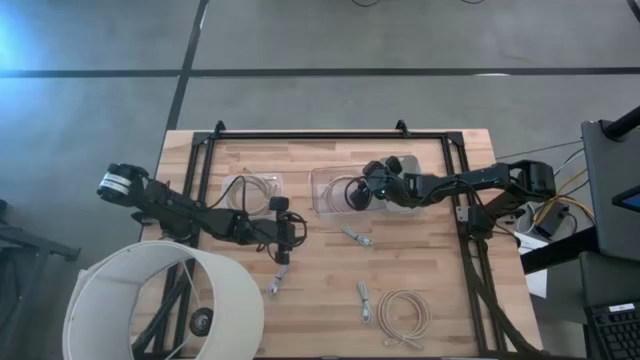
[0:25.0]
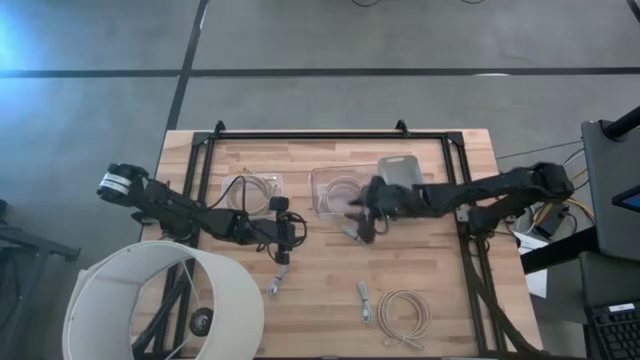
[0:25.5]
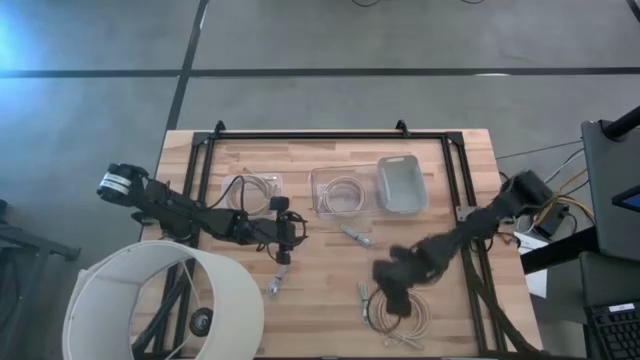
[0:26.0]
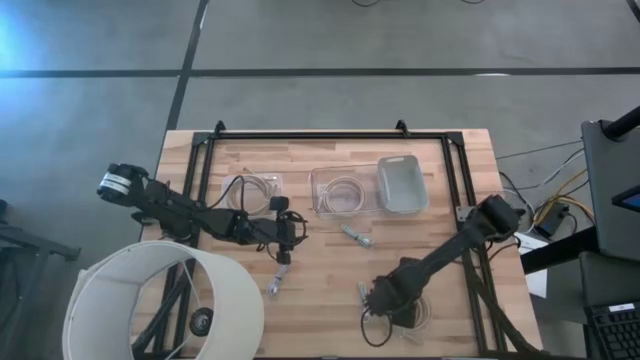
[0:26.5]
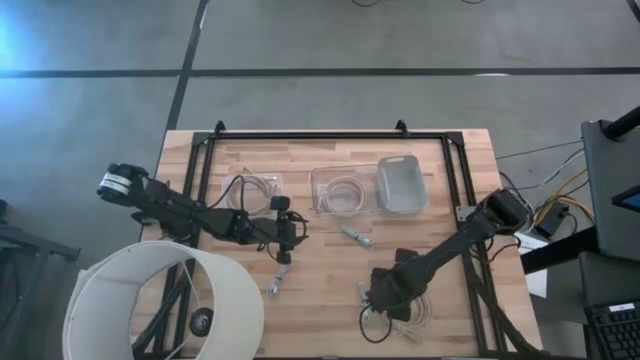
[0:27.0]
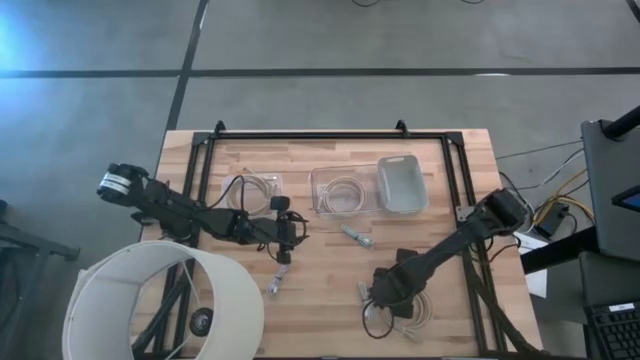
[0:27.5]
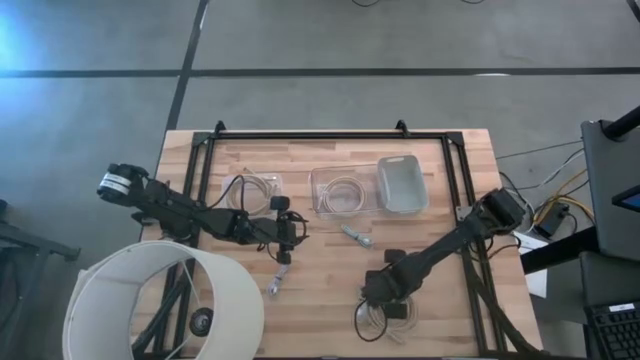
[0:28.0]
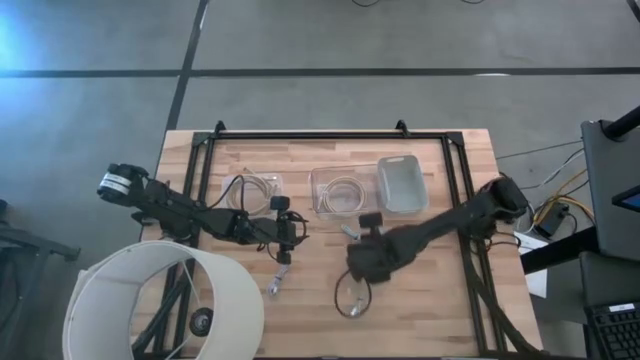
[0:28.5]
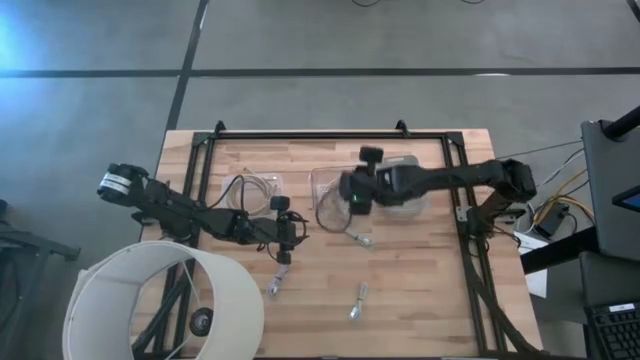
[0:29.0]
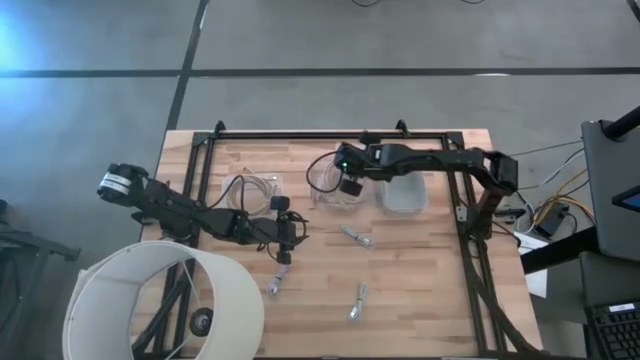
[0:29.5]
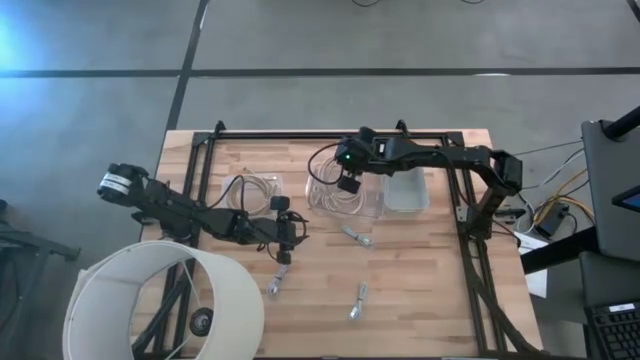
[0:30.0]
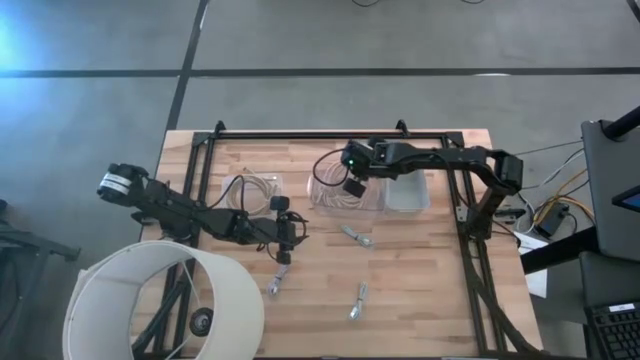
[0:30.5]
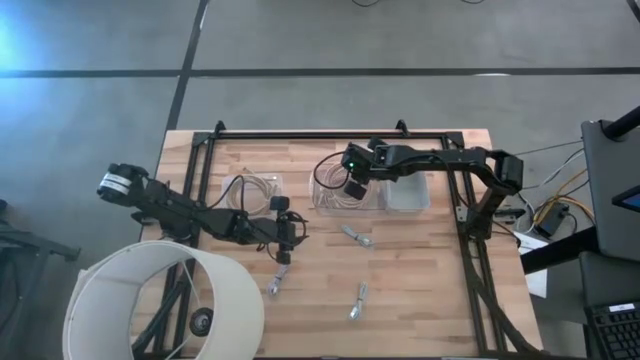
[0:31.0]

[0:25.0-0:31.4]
Task: Pick & Place USB Port
Put the brown charger cable into the right transparent bin

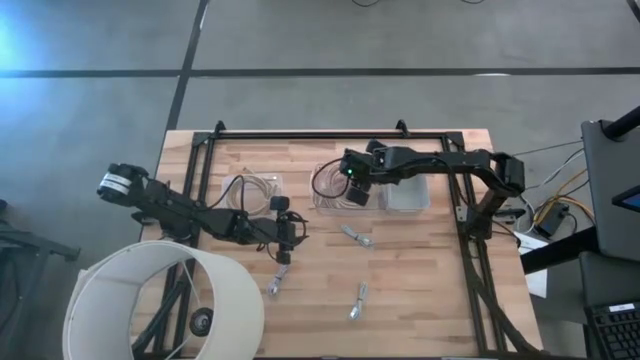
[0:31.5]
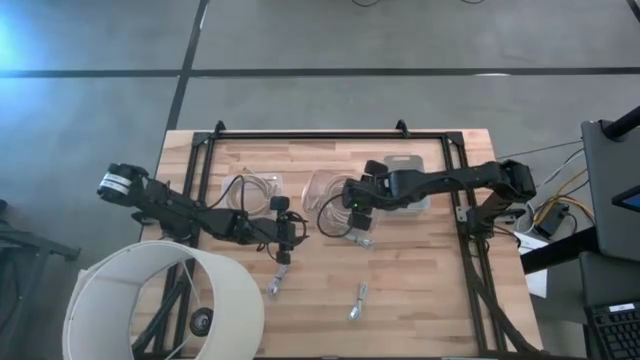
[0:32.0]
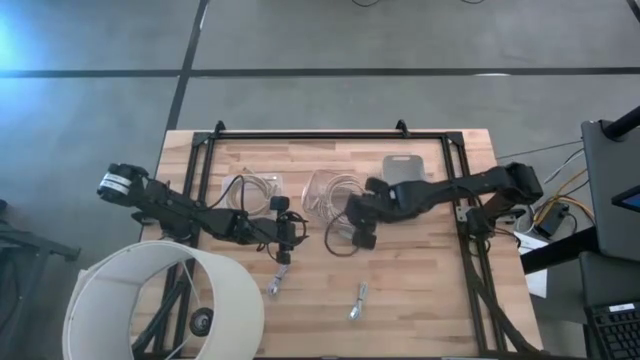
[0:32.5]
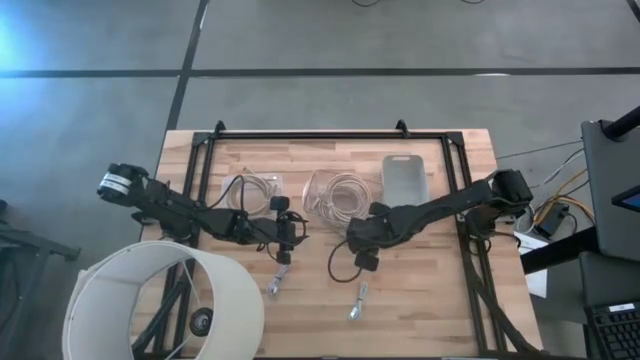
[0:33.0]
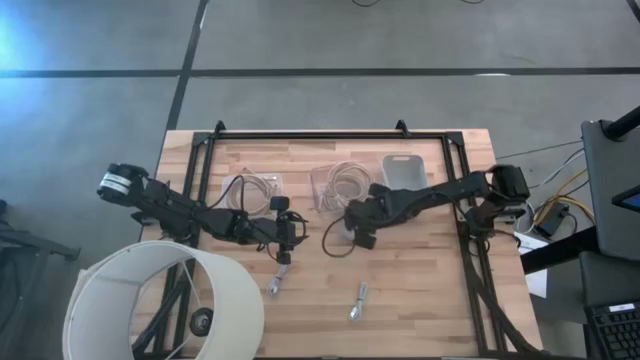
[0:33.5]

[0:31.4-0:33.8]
Adjust the right transparent bin

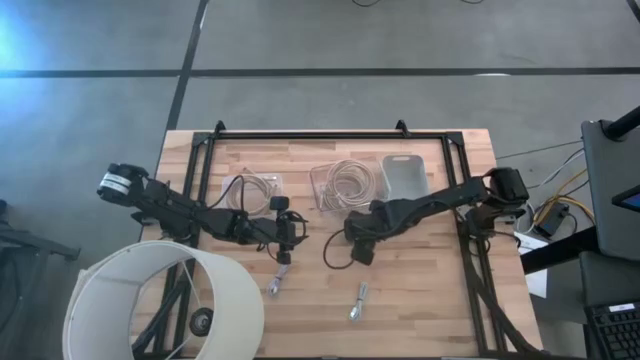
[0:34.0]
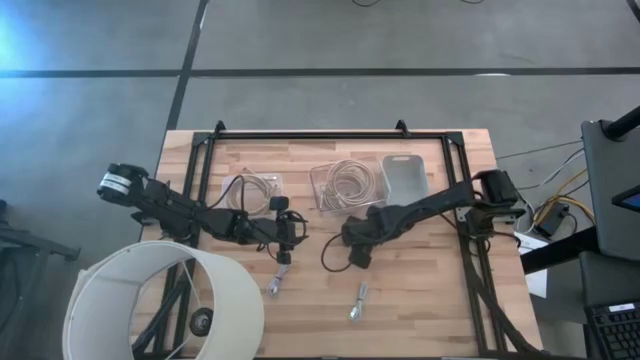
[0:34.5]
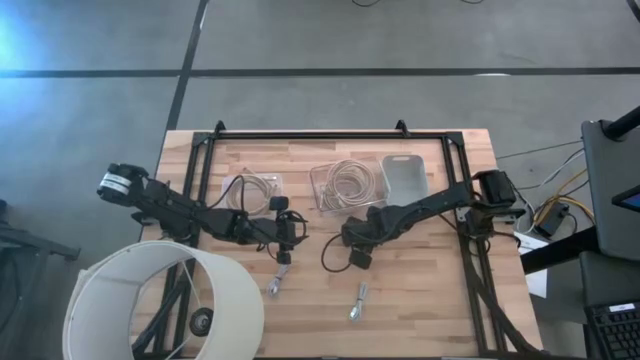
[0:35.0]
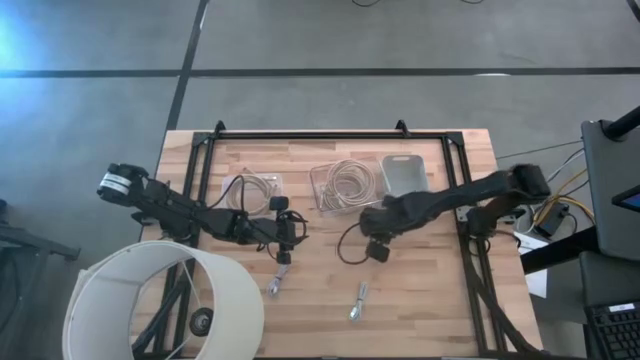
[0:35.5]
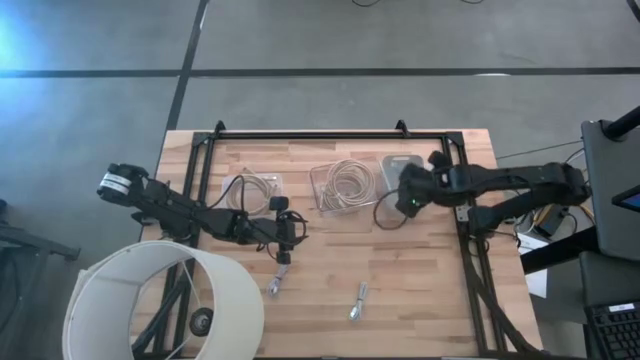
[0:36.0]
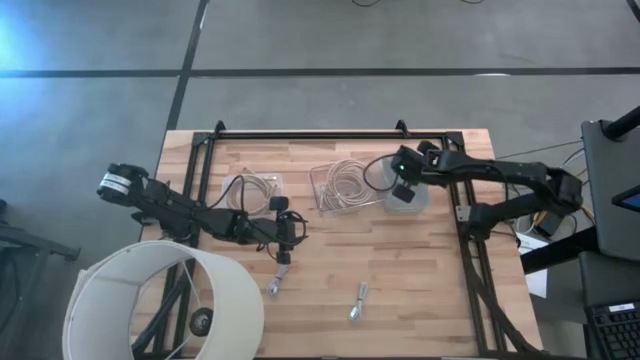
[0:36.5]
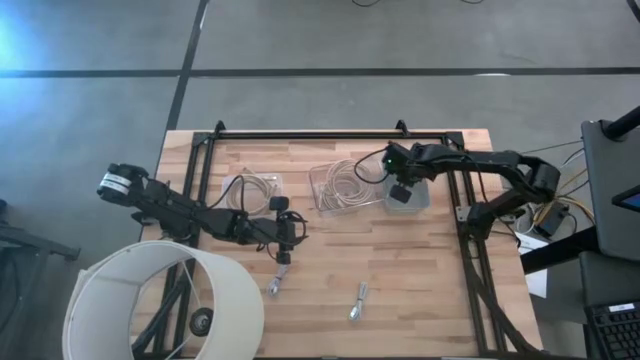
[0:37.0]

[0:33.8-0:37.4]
Put the top white charger cable into the white bin

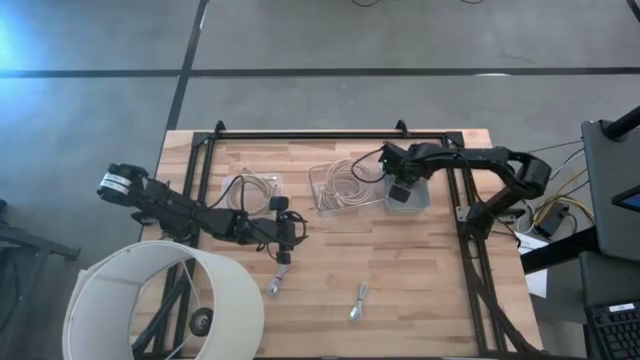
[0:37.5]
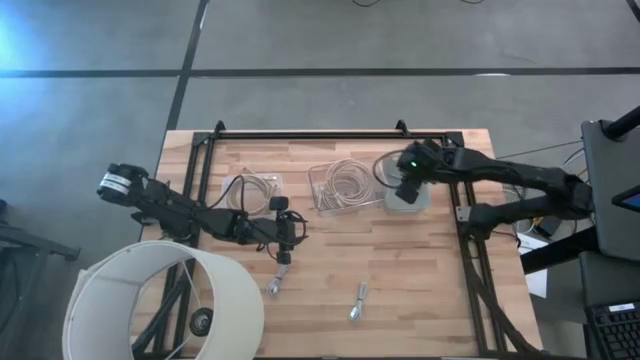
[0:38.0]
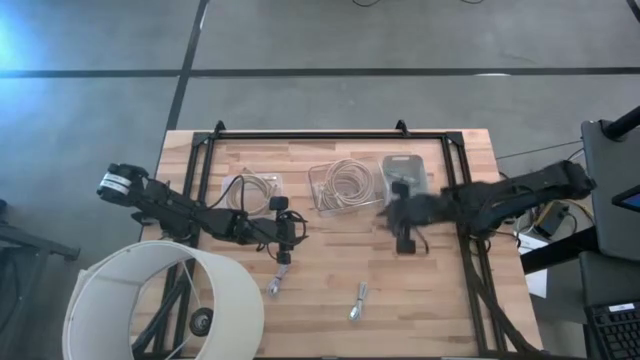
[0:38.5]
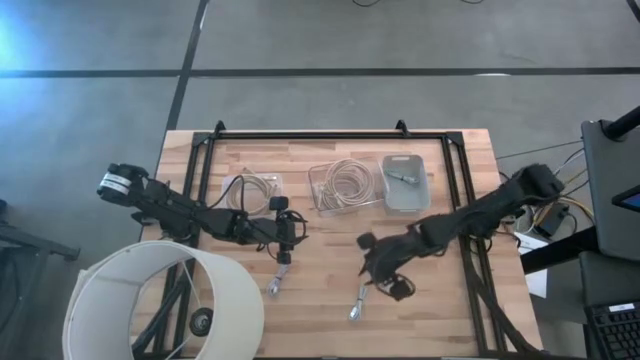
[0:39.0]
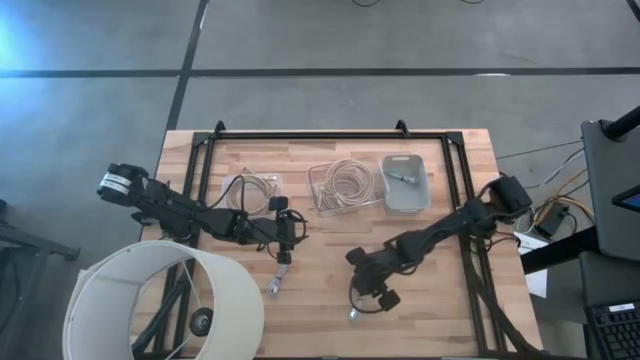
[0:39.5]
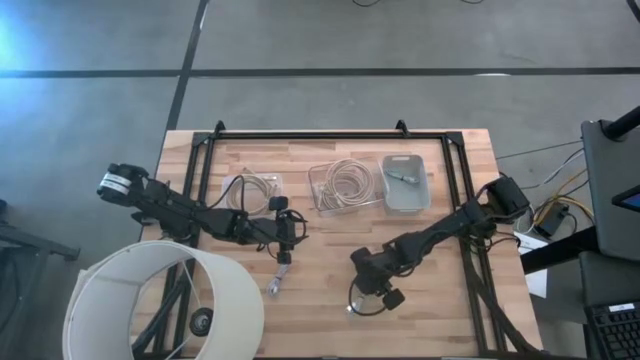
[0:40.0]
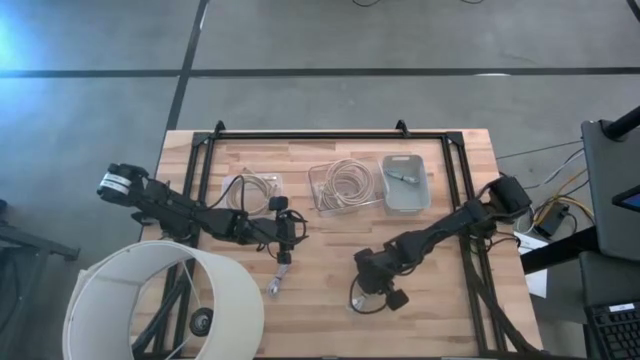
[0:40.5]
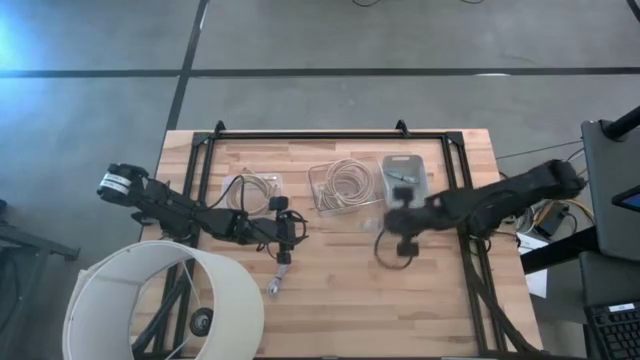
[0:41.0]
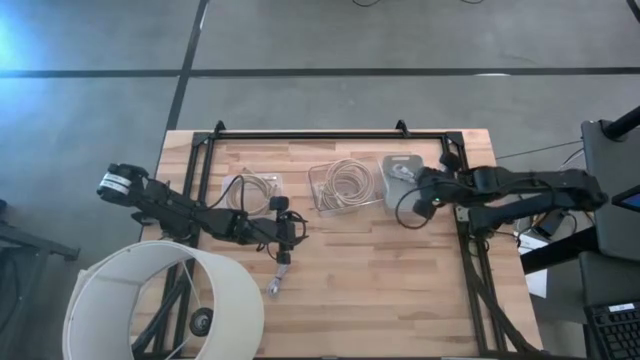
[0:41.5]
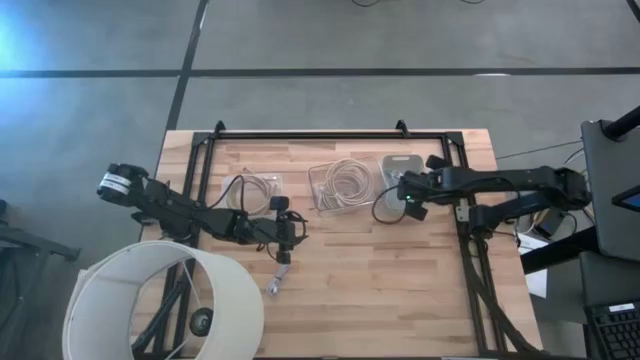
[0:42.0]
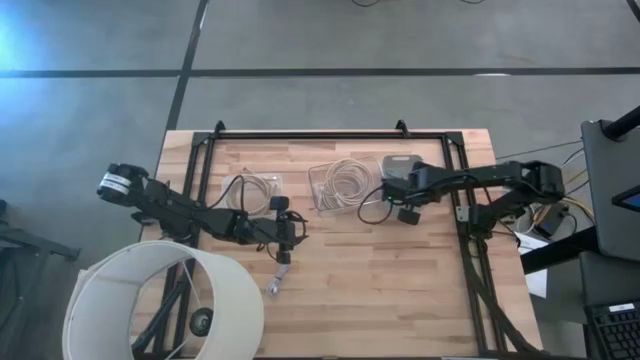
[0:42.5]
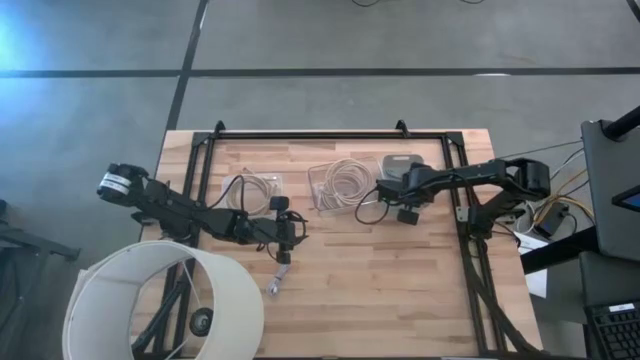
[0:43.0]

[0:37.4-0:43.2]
Put the right white charger cable into the white bin
